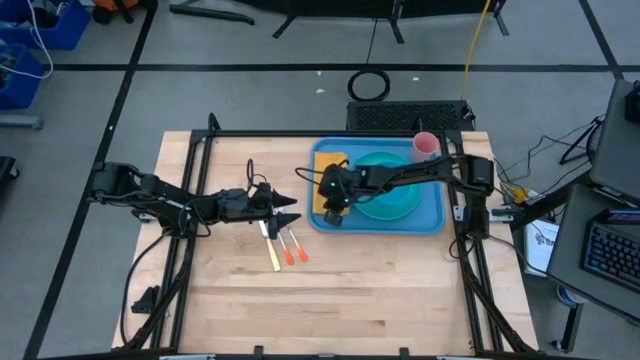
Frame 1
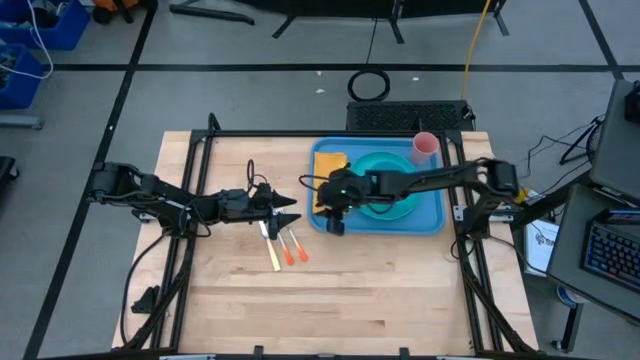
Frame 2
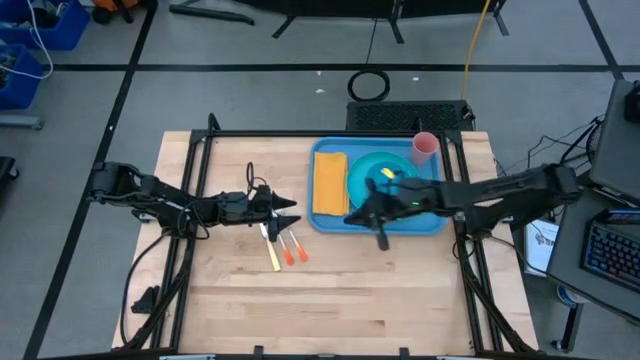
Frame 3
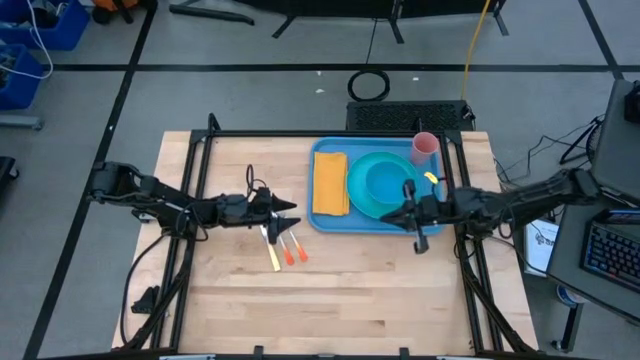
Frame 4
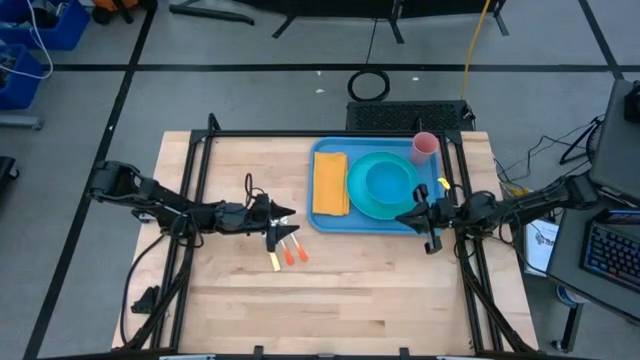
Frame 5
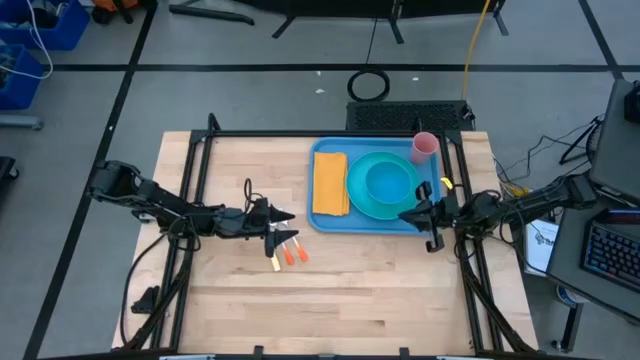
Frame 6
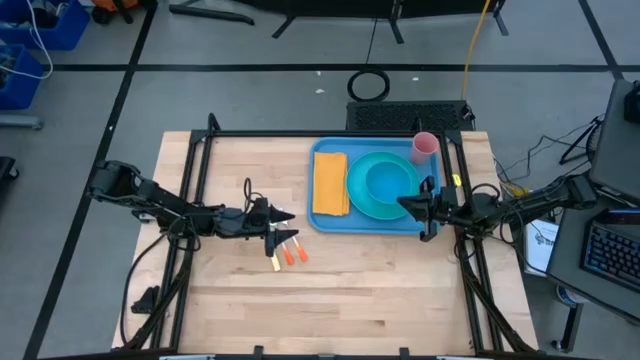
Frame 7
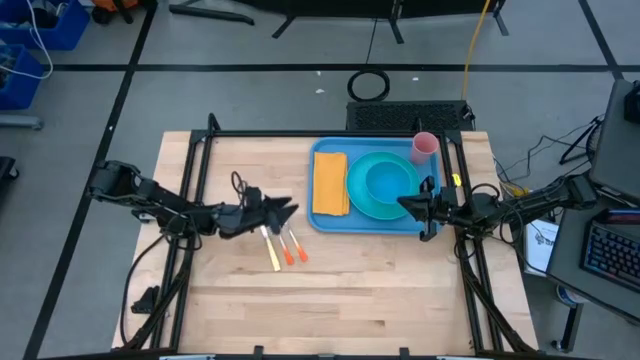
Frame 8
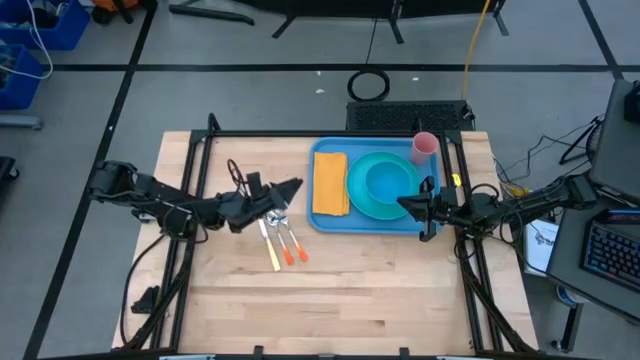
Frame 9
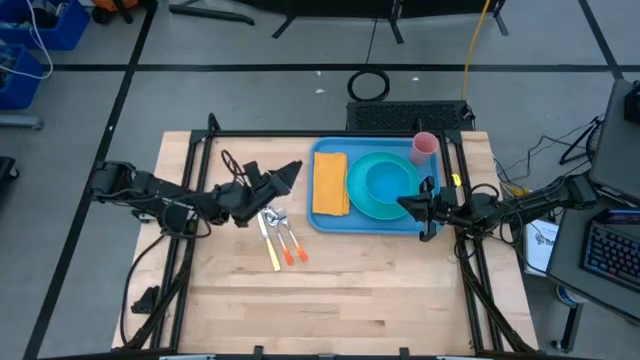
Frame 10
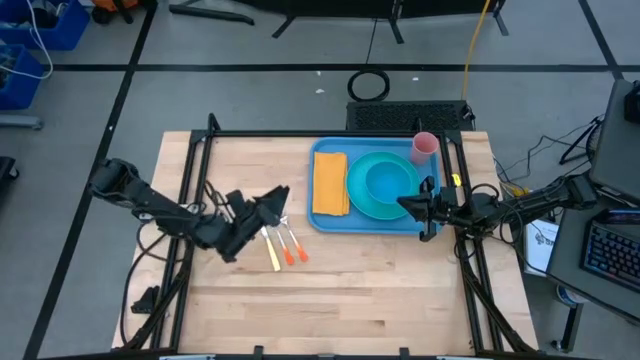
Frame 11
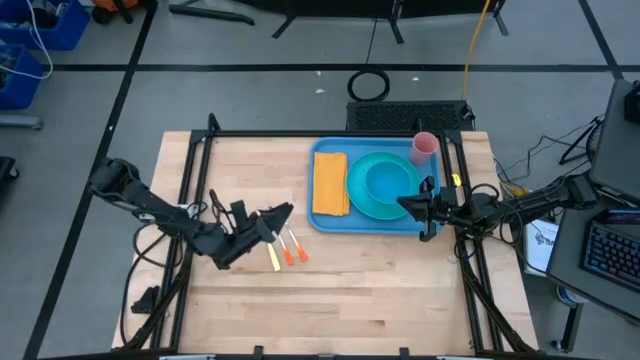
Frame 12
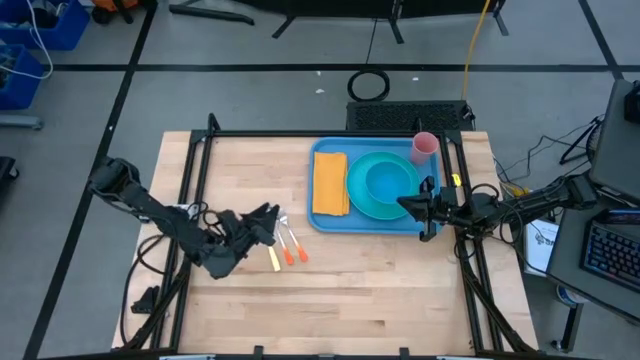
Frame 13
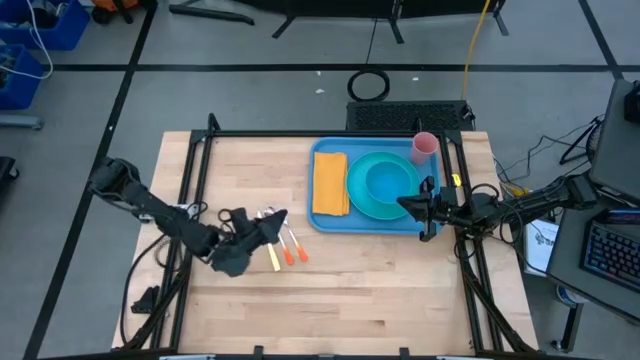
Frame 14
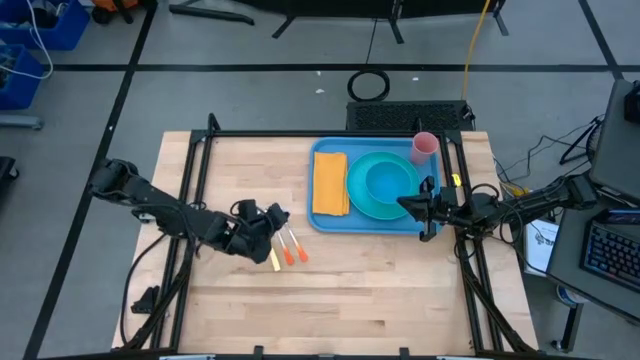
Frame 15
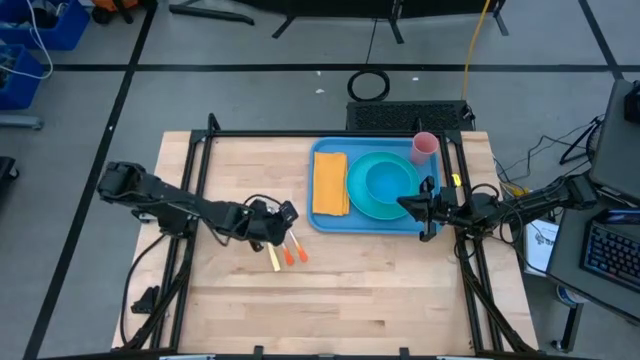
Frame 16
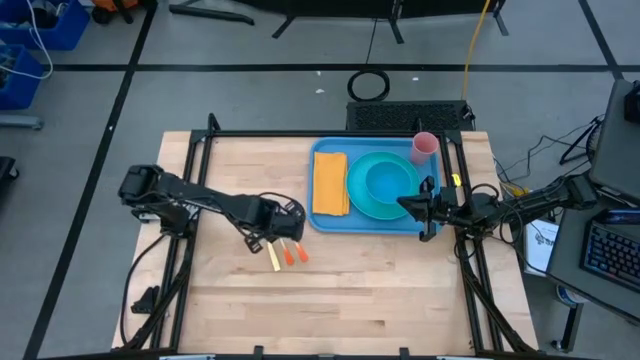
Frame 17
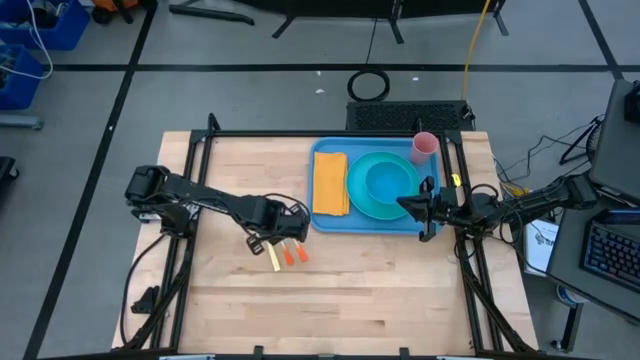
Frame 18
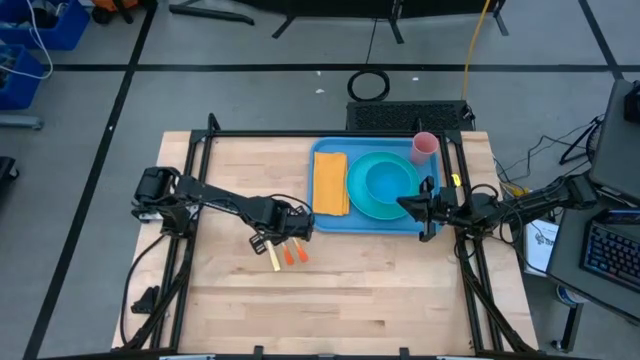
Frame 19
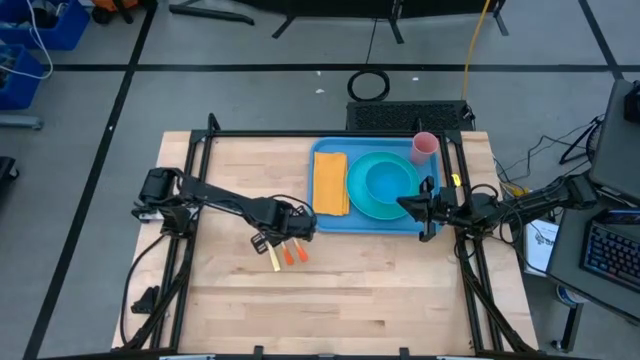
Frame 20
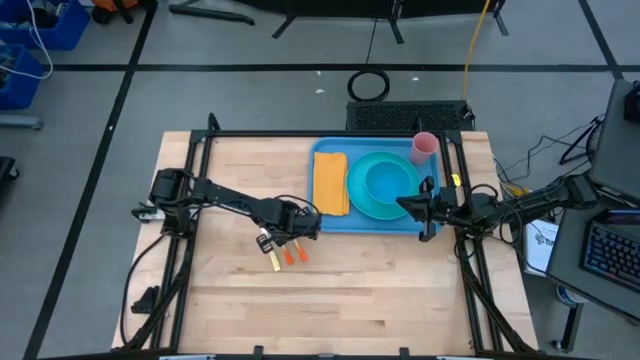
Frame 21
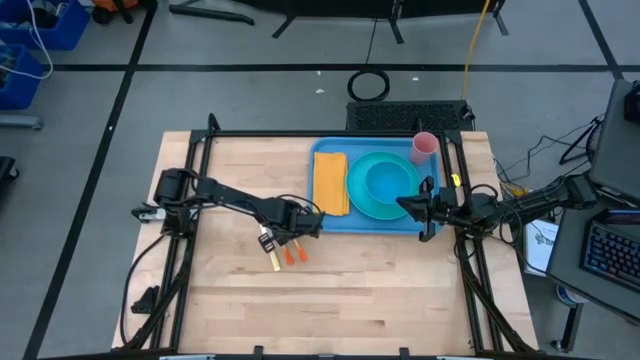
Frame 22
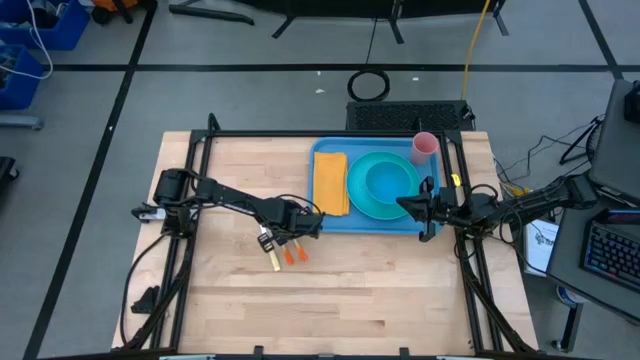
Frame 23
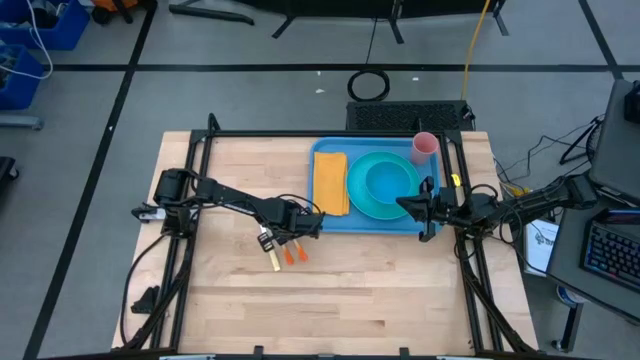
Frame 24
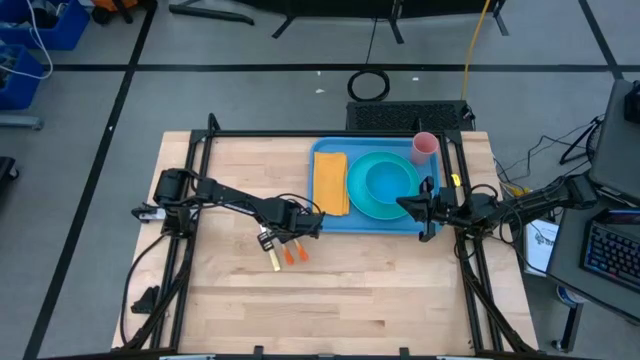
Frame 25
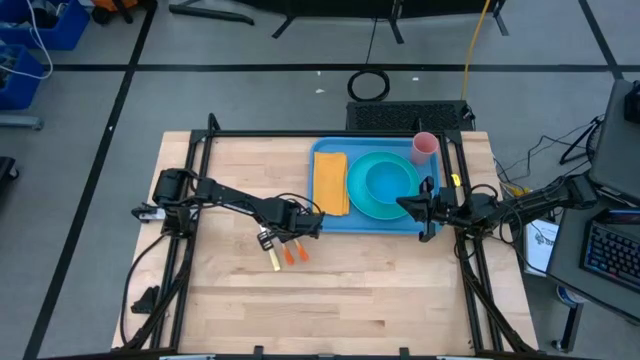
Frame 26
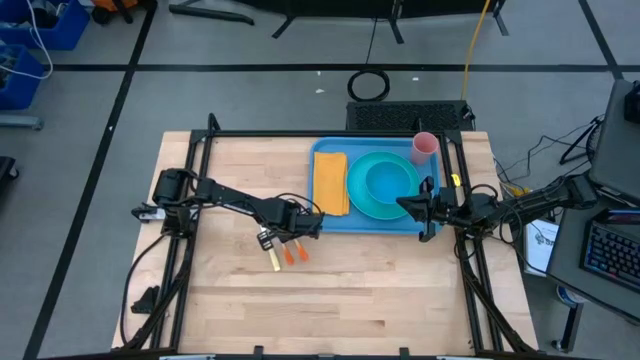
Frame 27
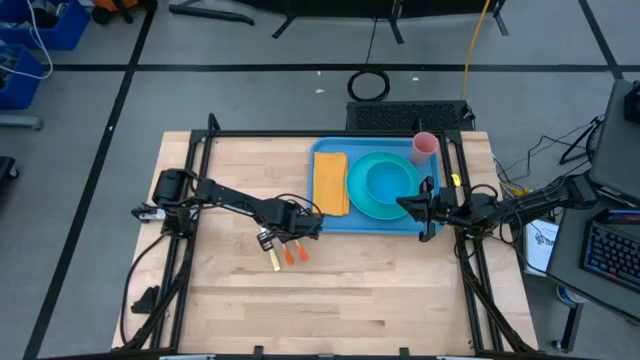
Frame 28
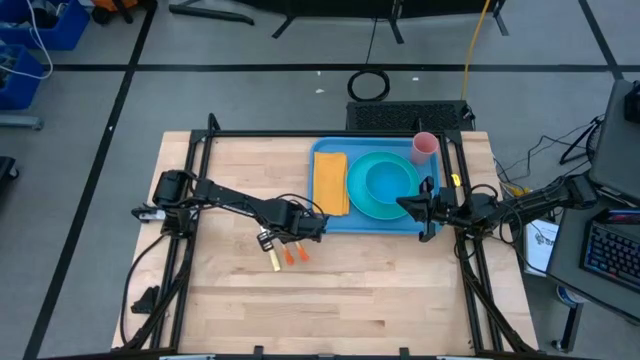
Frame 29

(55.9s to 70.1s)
Task: Set up tray
Put the silver fork onto the blue tray

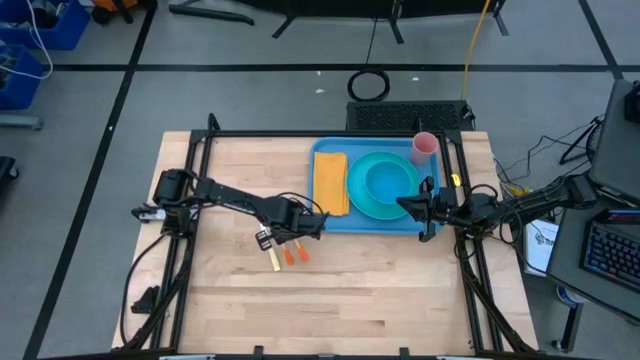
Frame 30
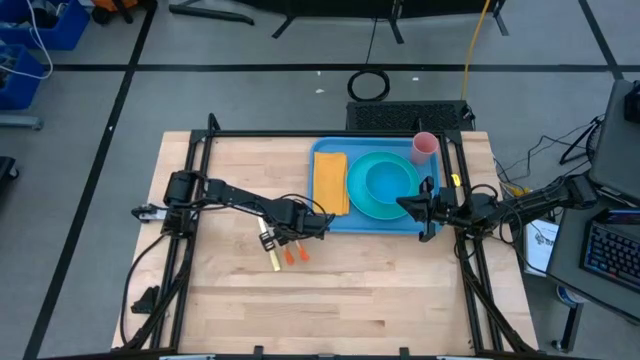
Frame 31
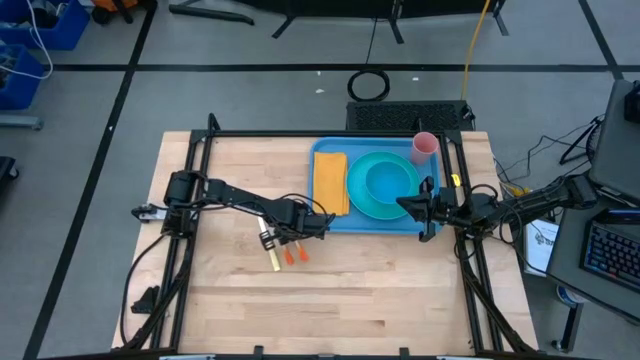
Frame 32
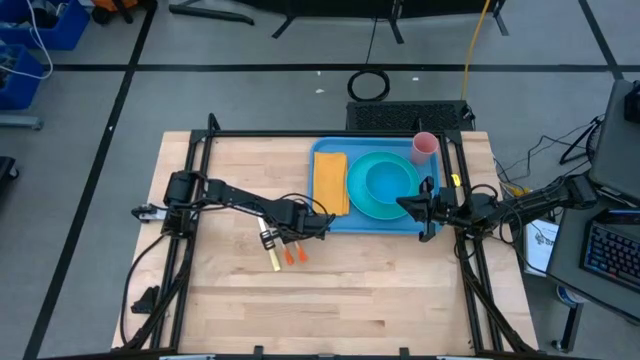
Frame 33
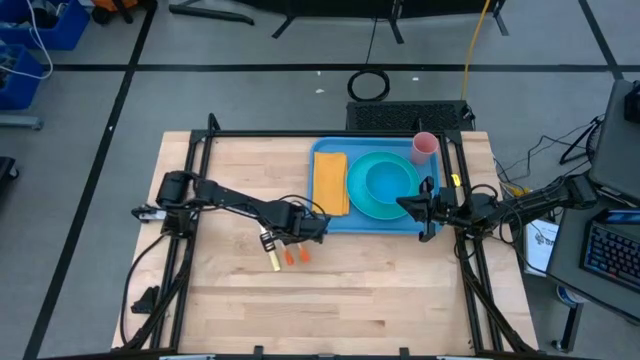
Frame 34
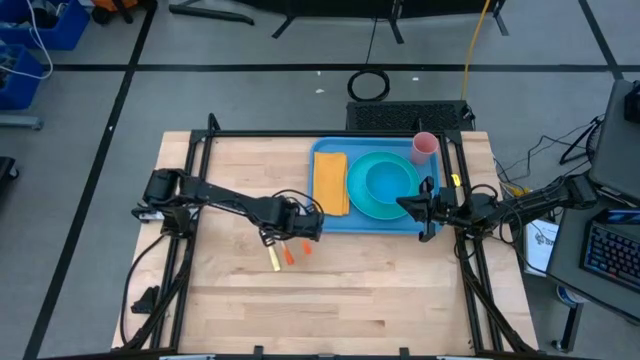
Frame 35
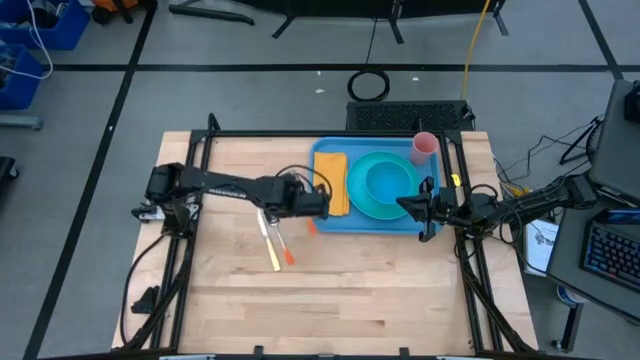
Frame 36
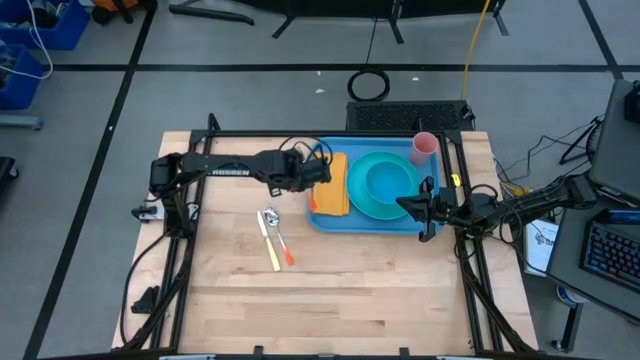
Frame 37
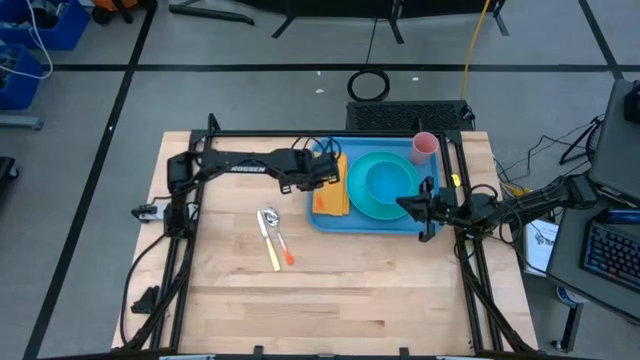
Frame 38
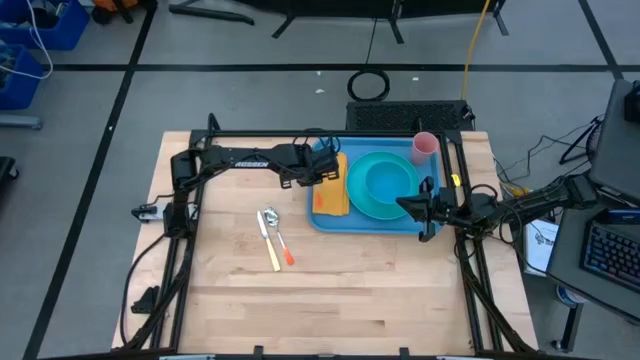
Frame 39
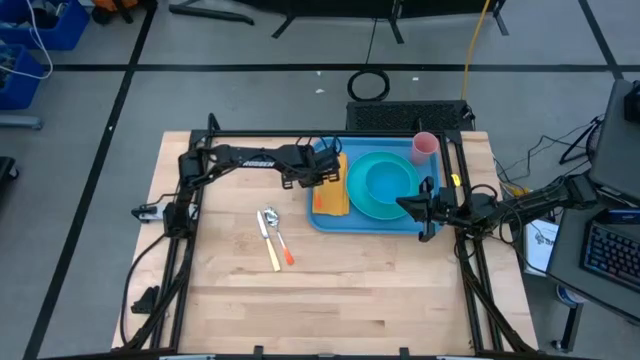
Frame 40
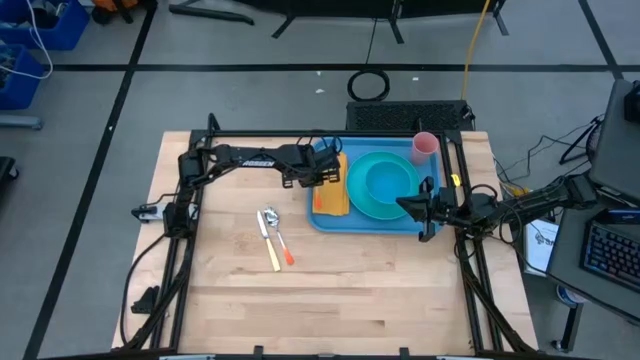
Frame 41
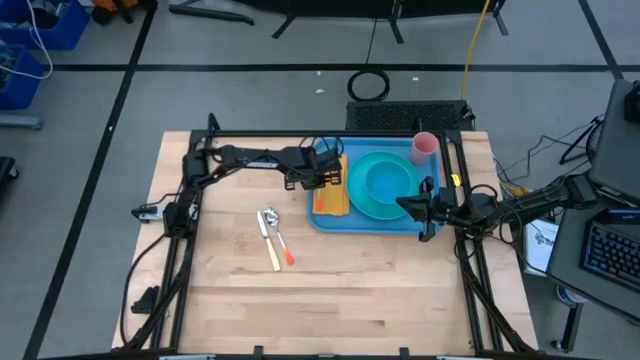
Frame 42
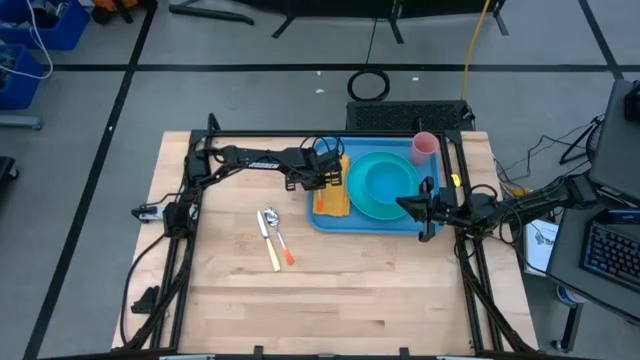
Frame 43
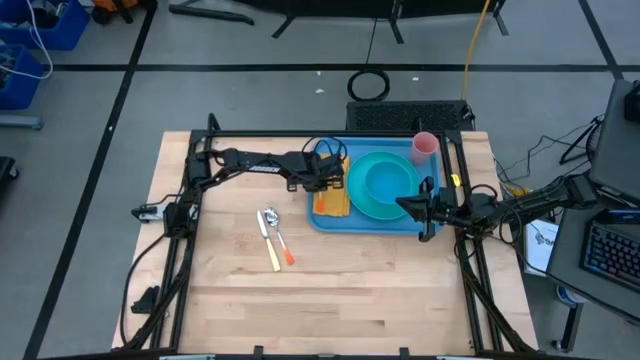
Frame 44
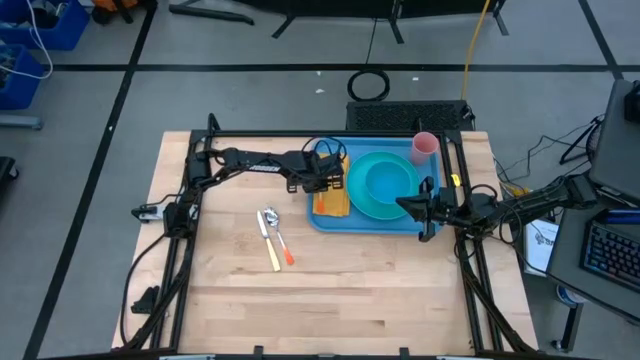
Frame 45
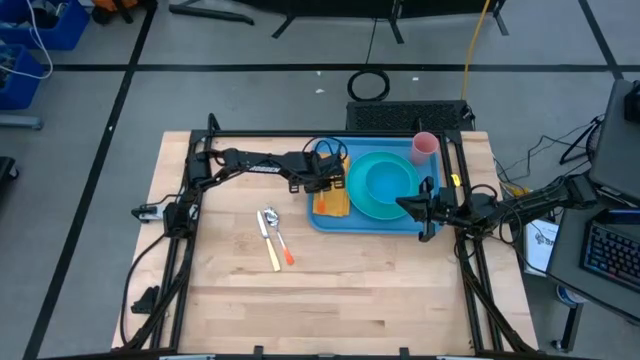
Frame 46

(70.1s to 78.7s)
Put the silver fork onto the blue tray
